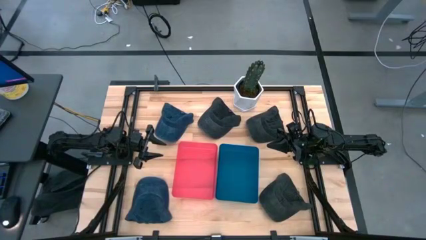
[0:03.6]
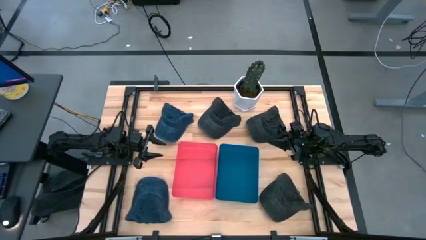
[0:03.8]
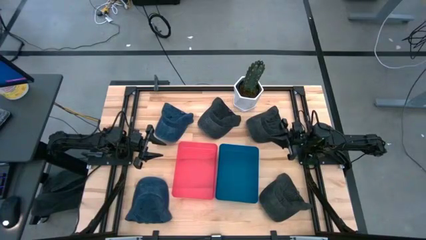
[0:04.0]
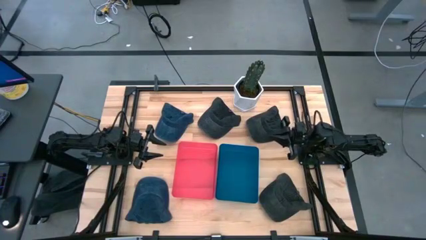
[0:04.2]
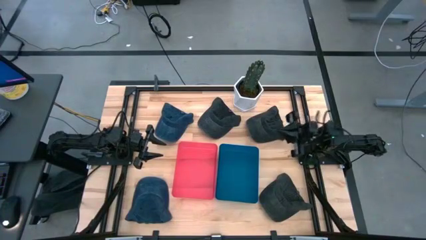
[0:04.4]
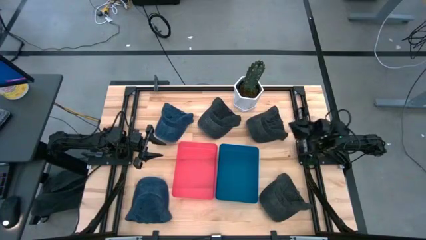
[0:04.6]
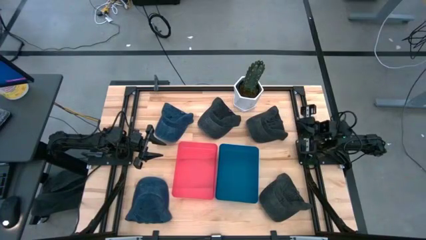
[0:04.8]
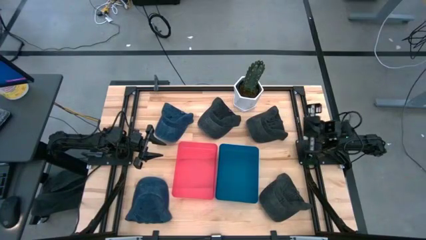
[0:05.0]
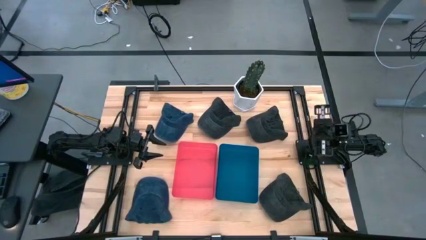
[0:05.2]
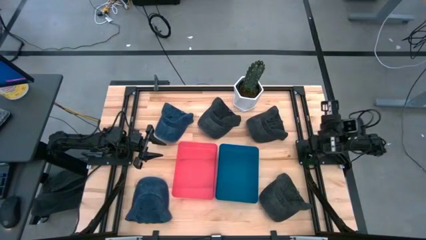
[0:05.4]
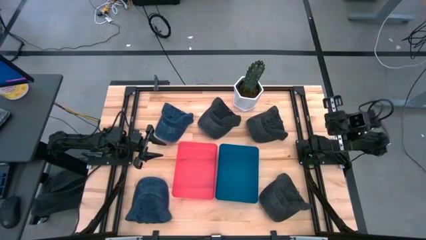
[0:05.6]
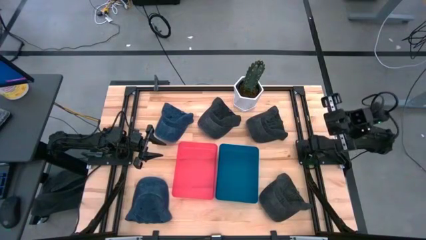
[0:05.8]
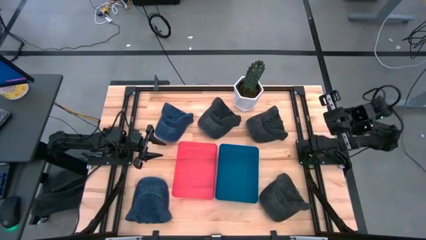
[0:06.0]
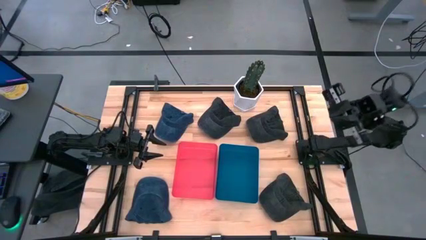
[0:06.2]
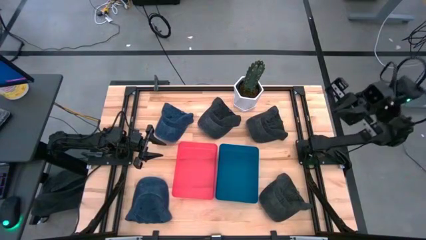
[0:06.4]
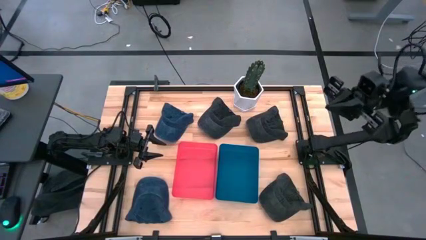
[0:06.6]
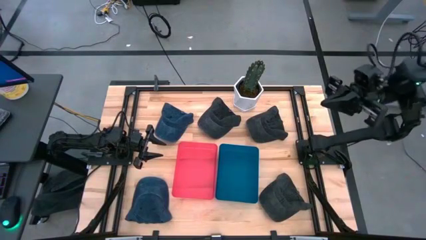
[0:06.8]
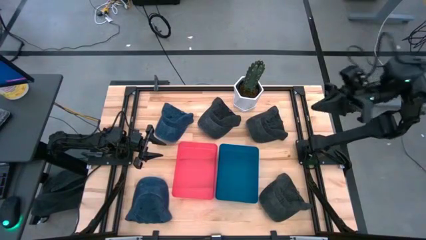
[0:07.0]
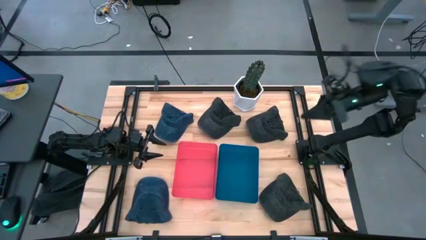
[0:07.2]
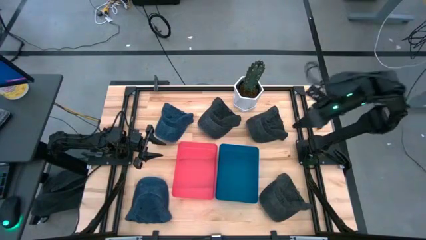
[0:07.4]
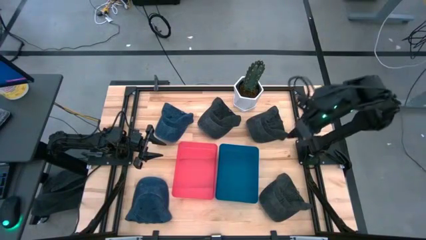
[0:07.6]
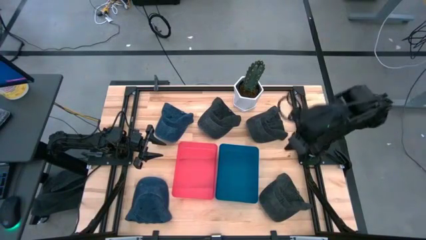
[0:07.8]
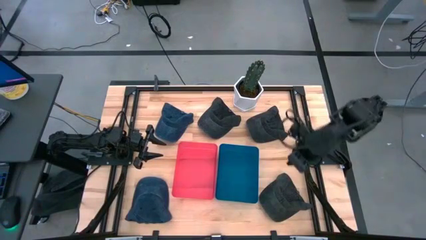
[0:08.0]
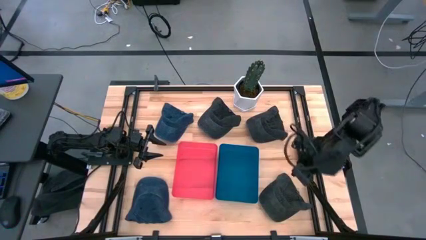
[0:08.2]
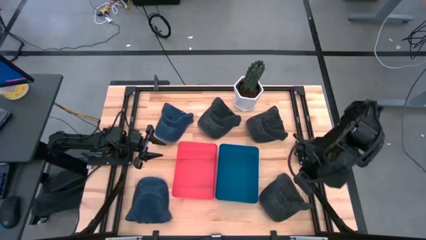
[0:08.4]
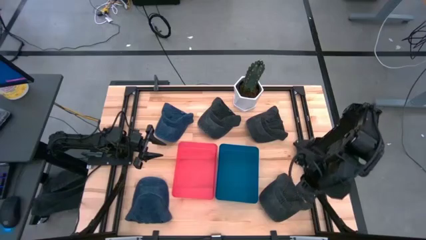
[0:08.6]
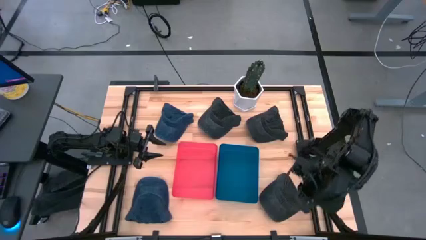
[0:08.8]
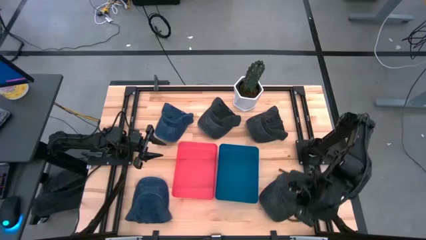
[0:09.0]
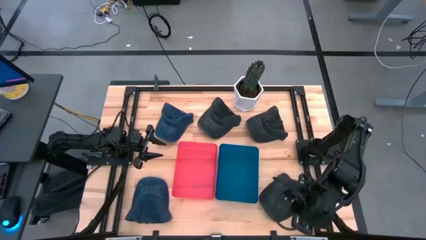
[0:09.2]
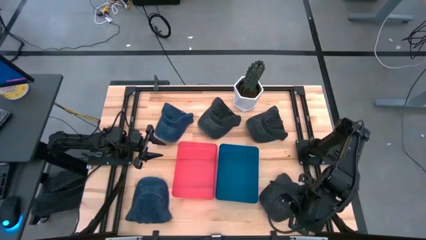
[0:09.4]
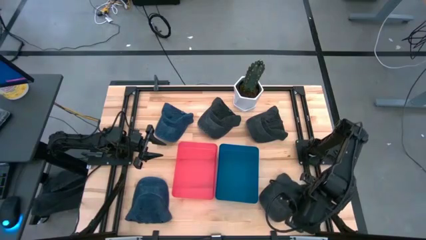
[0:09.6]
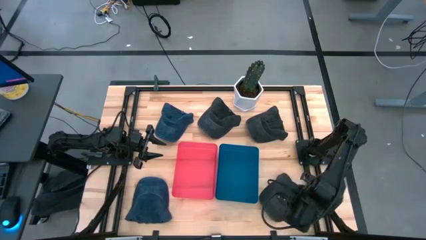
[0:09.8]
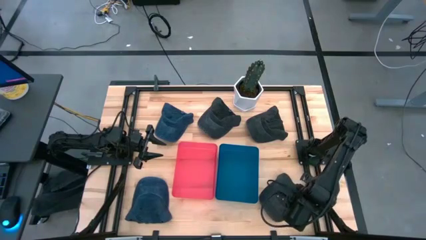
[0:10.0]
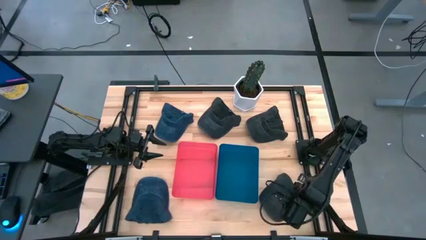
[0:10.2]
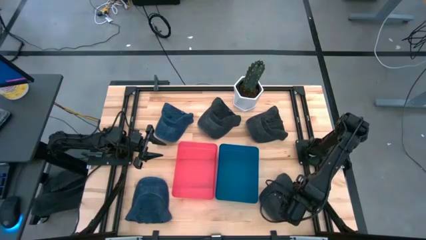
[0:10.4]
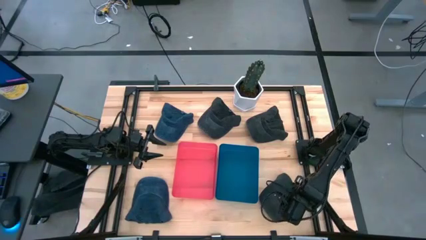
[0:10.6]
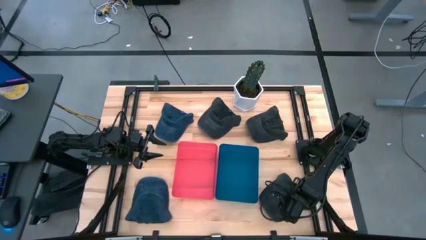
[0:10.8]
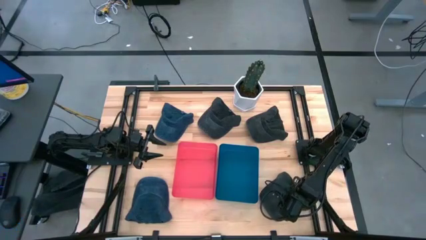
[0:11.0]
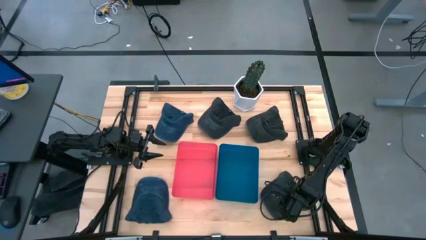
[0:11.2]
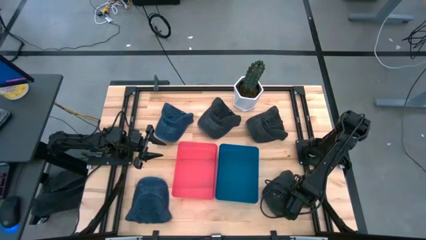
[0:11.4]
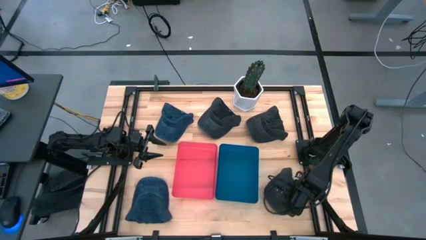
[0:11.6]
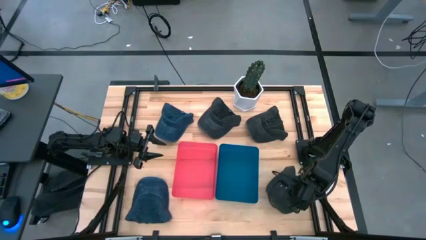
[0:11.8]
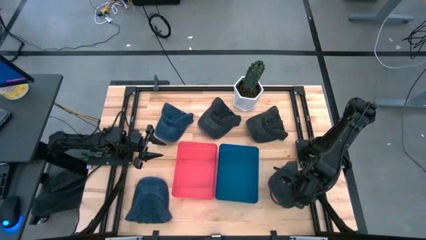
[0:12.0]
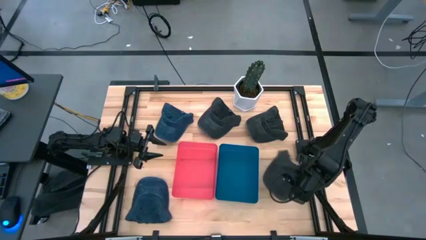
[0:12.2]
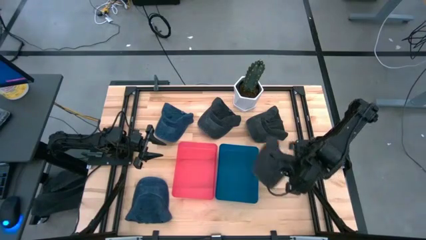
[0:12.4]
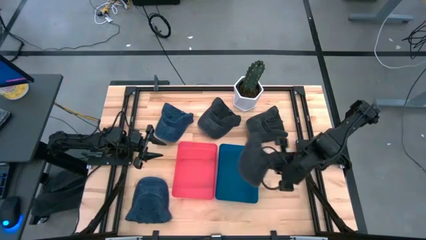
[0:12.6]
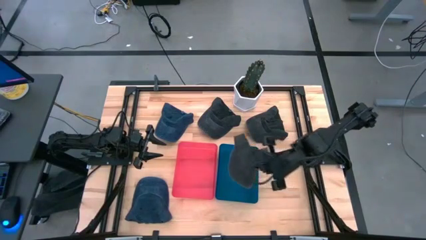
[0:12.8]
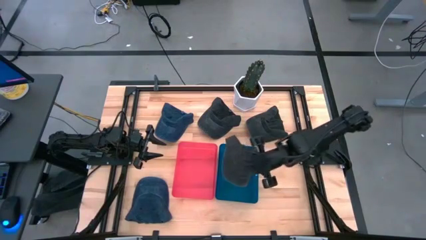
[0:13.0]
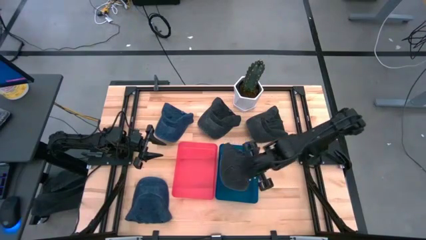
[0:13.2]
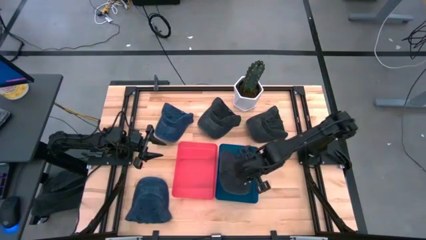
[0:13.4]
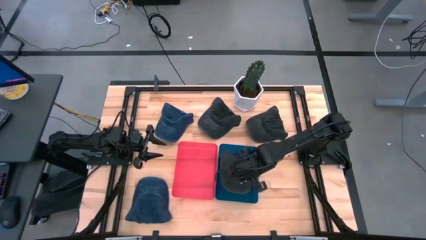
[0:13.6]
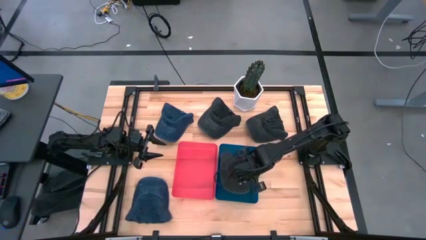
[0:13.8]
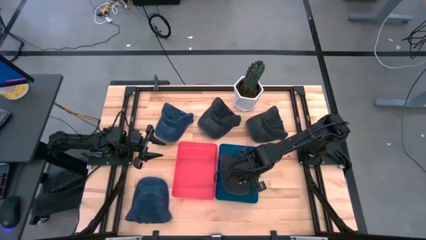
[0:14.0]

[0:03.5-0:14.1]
Task: Pick & Place hat
Put the bottom right black cap into the blue bin

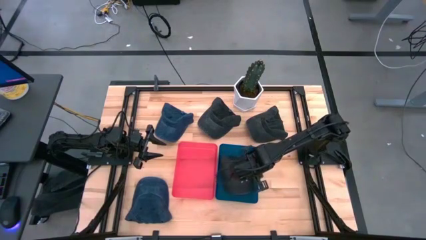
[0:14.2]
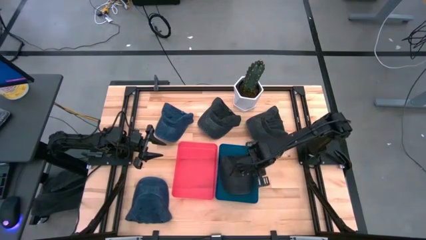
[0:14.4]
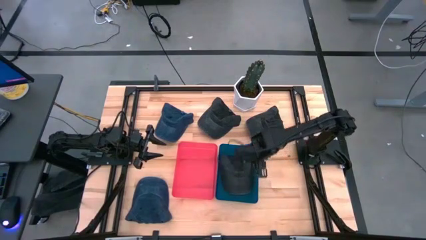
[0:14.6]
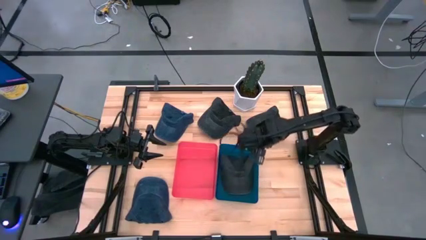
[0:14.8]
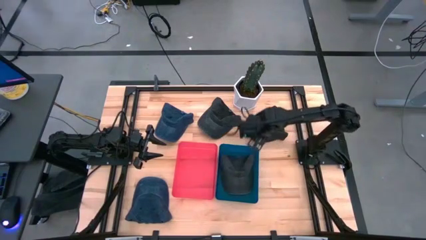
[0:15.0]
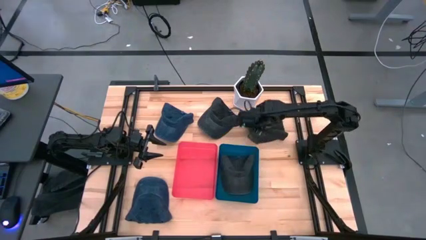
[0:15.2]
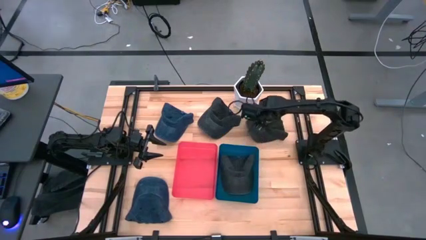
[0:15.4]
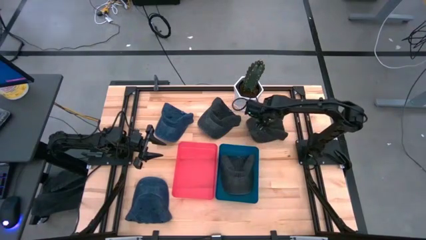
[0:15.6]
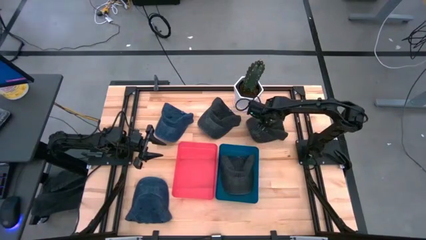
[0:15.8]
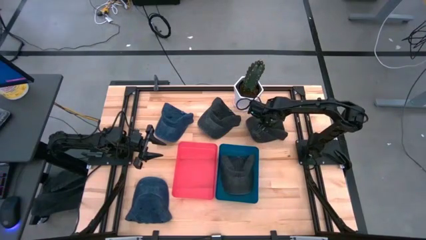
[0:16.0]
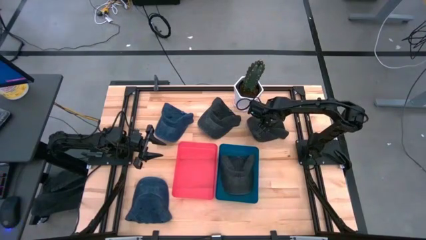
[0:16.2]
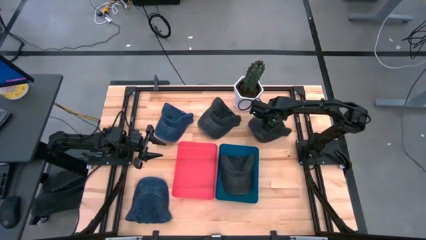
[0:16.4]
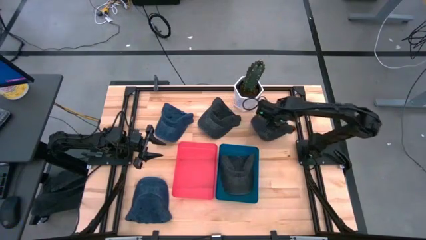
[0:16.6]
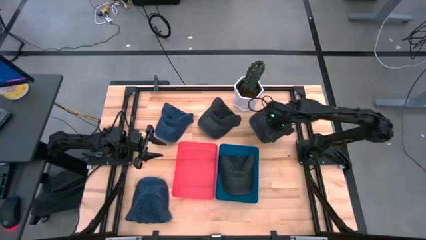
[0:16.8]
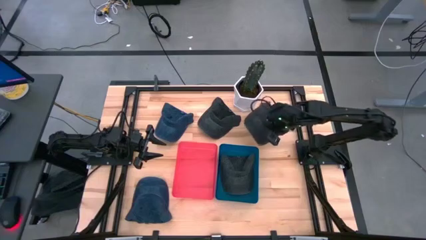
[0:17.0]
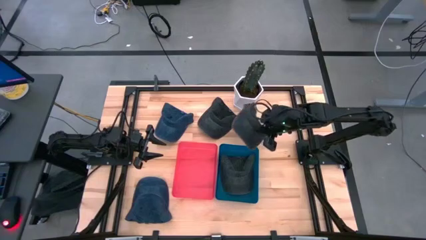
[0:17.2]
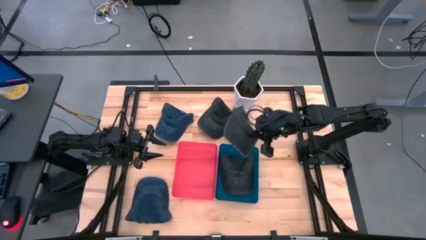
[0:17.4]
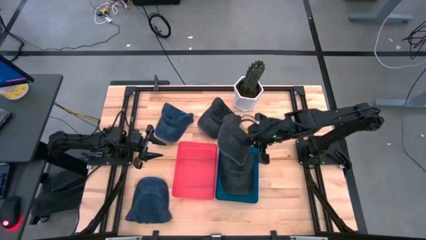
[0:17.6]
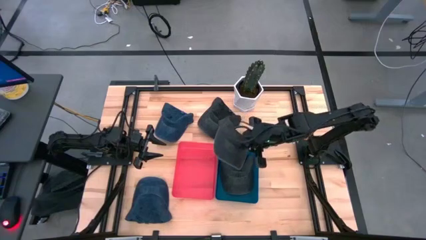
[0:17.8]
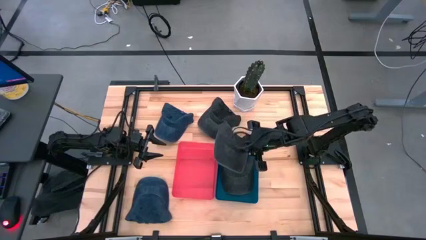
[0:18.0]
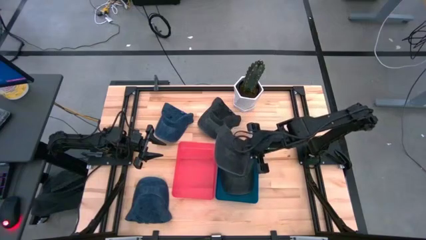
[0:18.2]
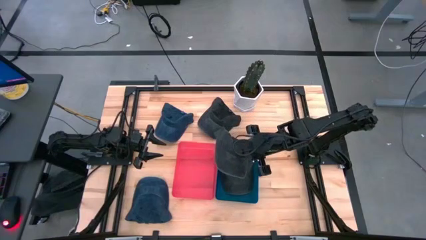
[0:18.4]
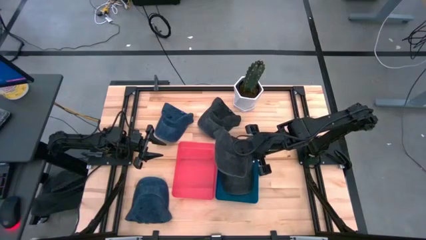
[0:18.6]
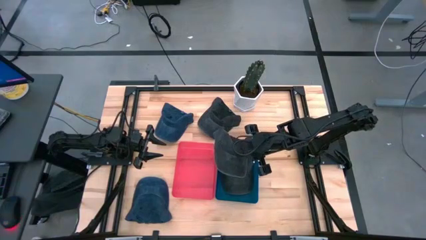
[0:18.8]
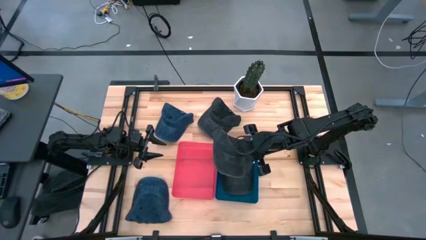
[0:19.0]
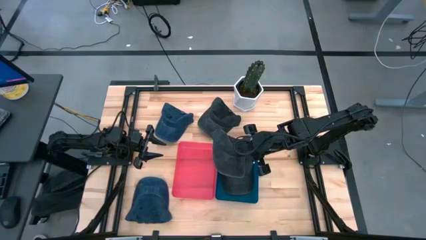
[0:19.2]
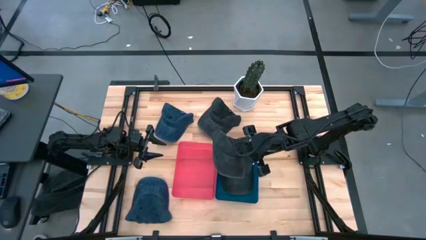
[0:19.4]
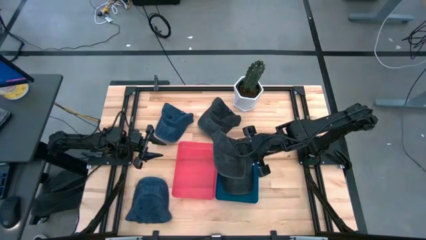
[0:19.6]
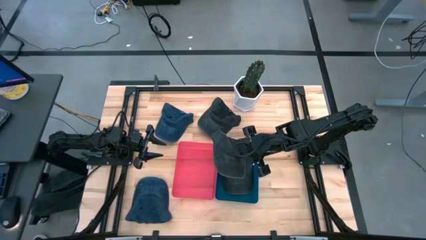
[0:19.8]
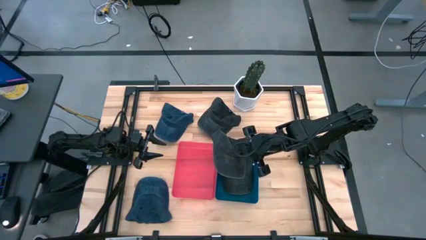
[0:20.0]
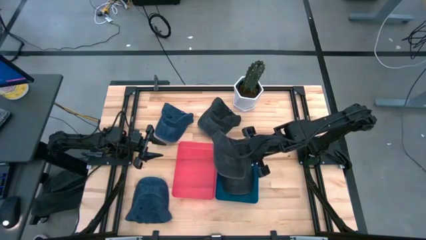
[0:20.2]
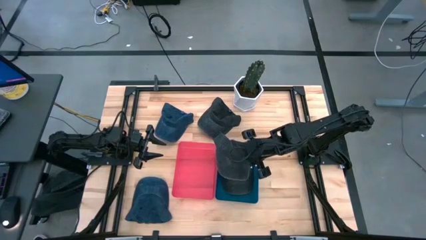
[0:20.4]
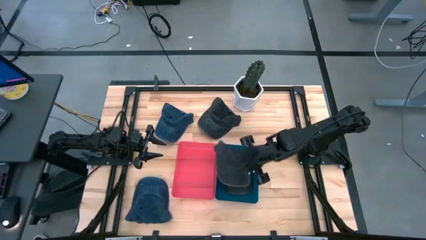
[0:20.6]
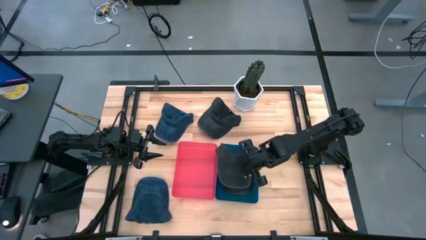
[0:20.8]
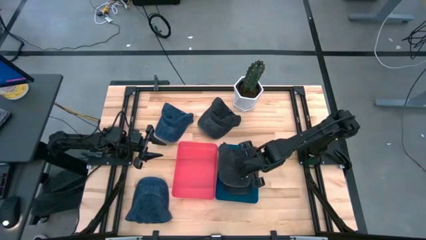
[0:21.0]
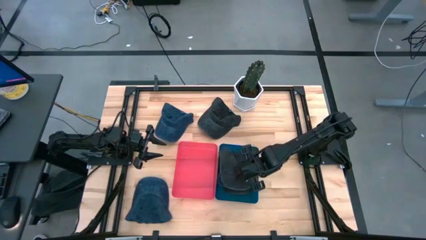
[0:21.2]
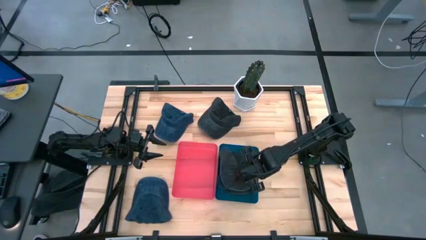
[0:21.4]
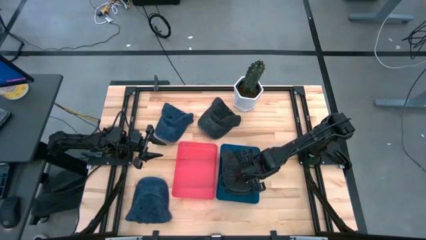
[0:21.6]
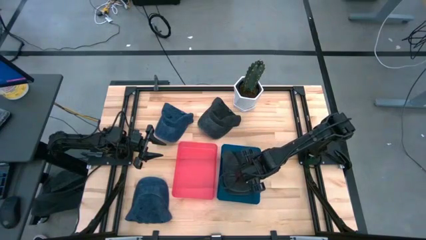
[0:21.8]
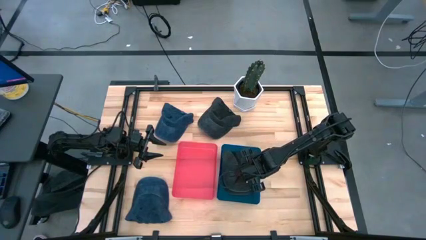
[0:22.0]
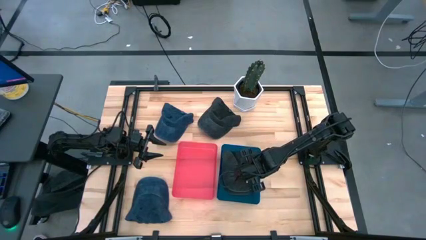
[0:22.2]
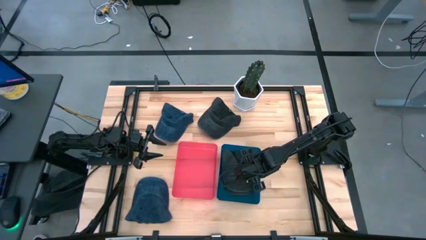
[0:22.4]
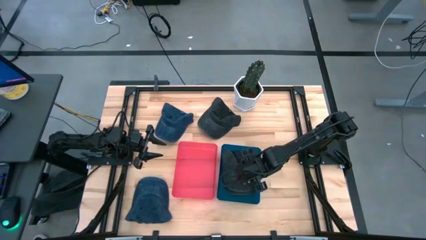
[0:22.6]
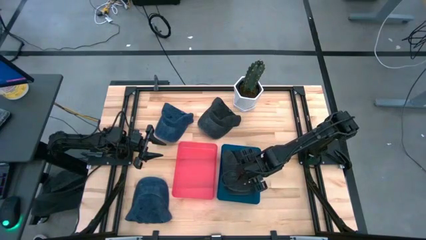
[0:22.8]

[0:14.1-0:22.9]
Put the right black cap into the blue bin
